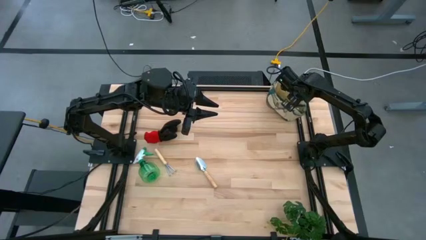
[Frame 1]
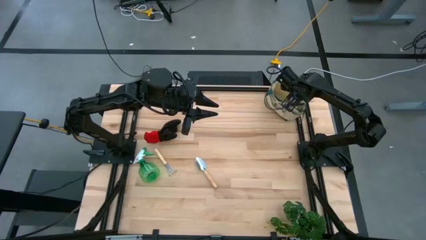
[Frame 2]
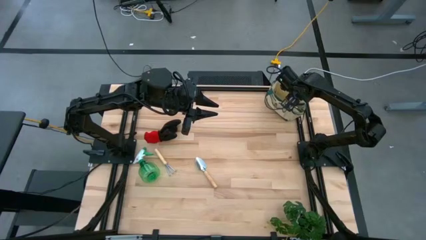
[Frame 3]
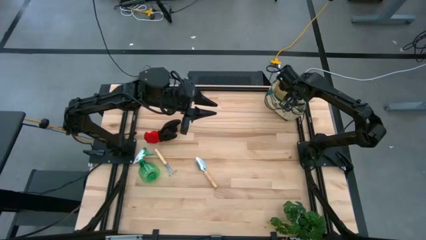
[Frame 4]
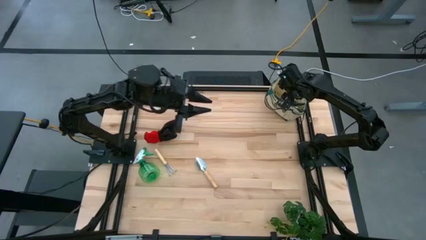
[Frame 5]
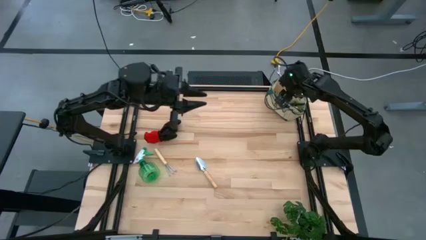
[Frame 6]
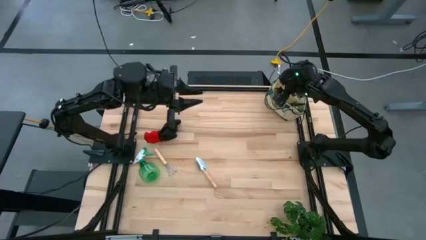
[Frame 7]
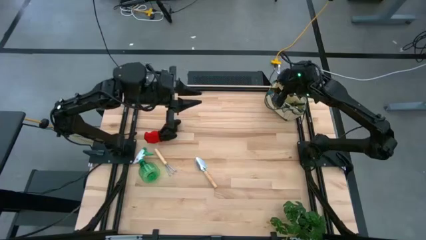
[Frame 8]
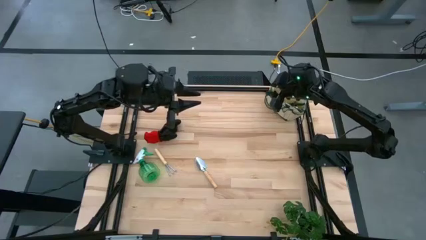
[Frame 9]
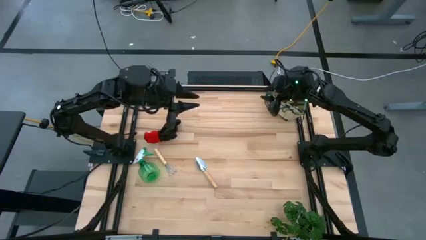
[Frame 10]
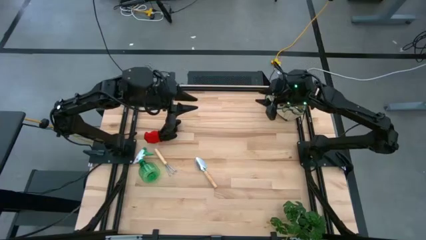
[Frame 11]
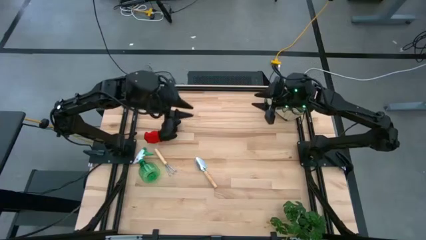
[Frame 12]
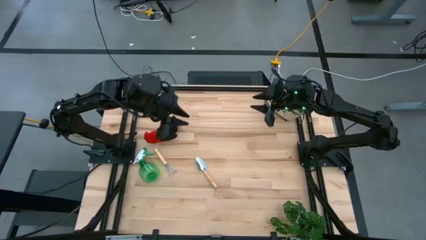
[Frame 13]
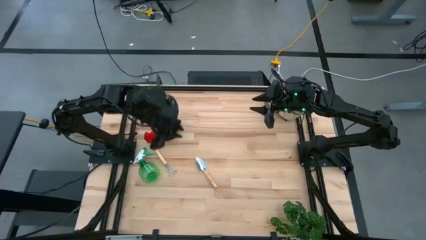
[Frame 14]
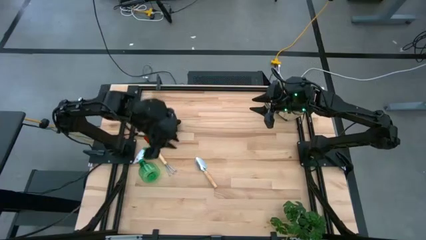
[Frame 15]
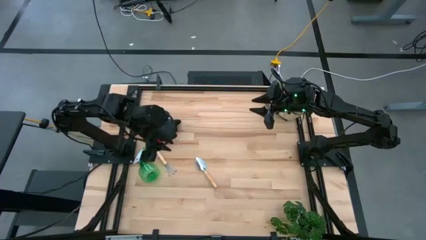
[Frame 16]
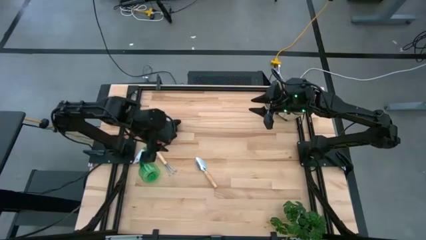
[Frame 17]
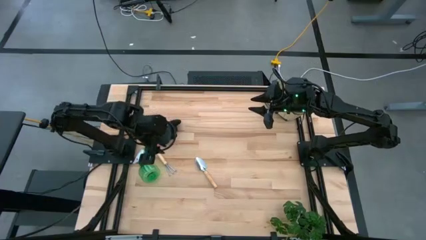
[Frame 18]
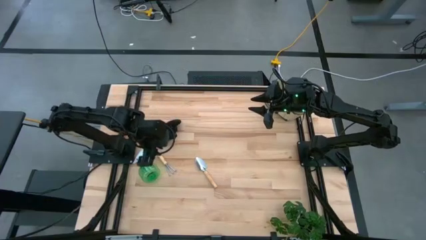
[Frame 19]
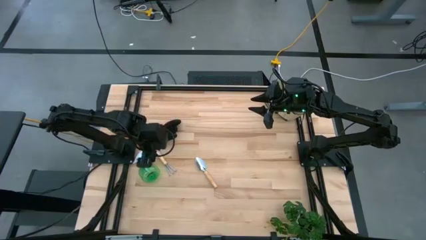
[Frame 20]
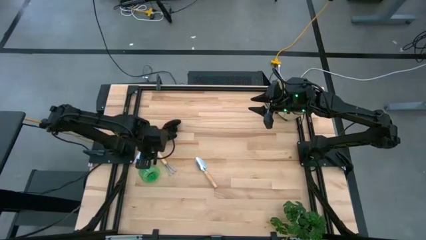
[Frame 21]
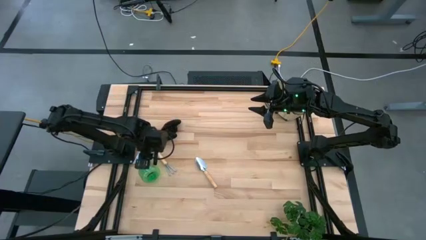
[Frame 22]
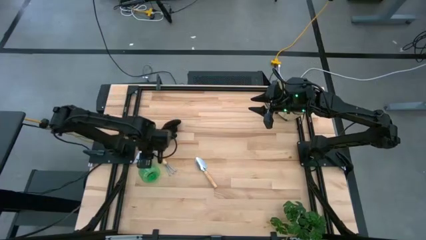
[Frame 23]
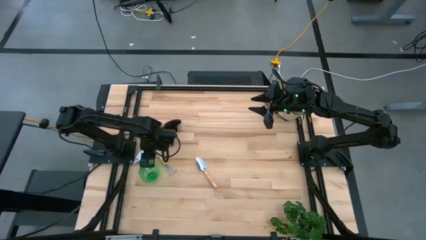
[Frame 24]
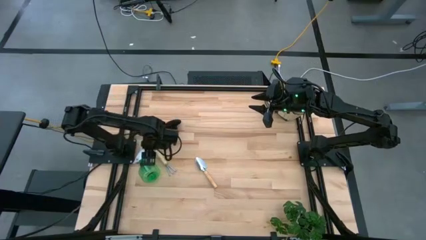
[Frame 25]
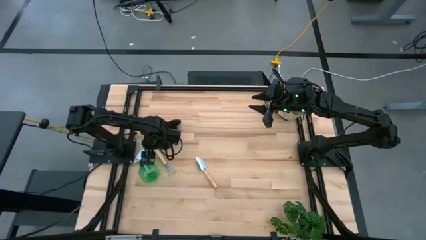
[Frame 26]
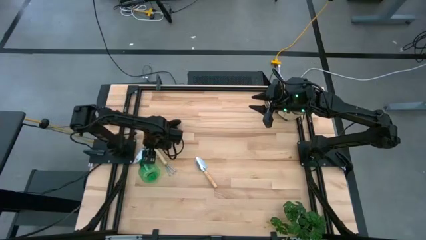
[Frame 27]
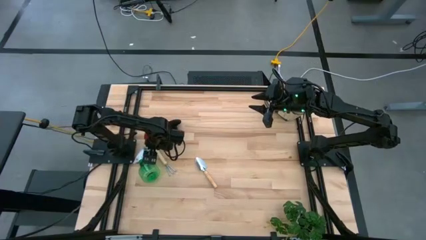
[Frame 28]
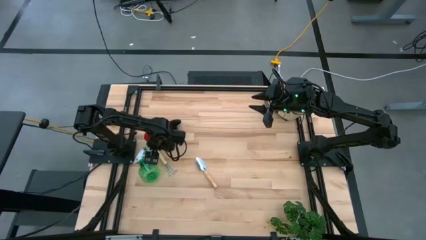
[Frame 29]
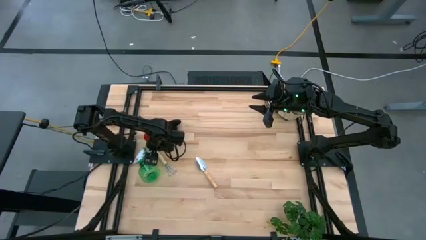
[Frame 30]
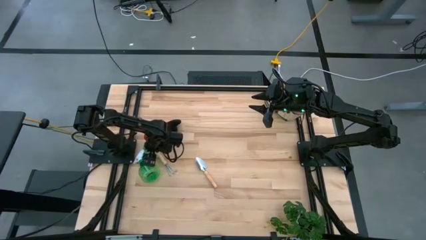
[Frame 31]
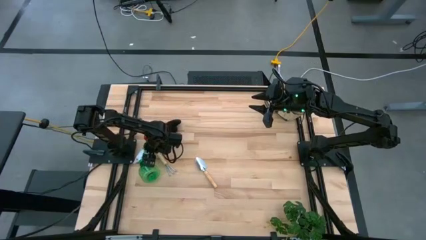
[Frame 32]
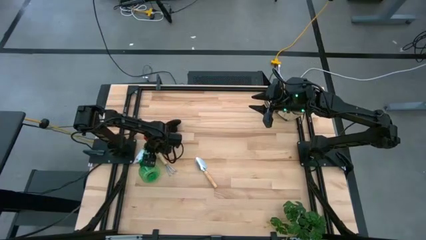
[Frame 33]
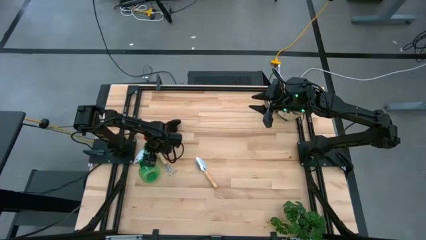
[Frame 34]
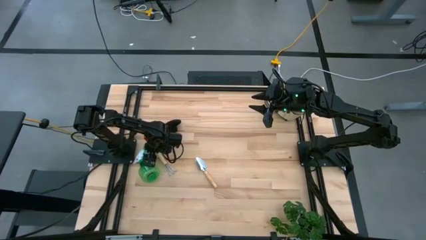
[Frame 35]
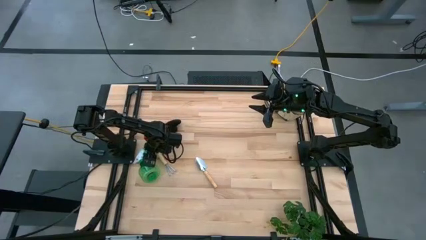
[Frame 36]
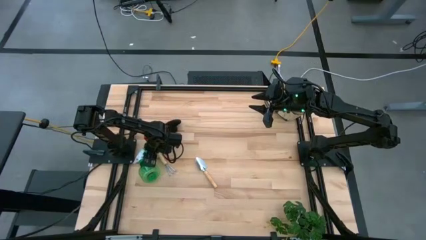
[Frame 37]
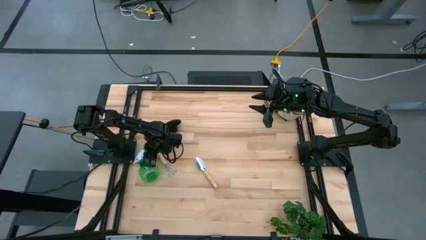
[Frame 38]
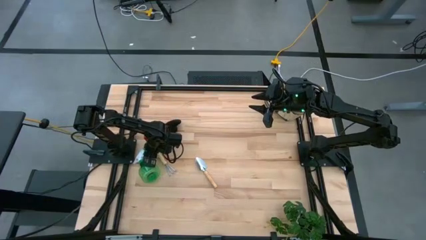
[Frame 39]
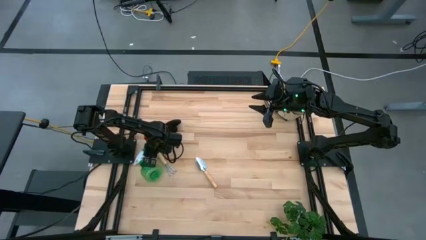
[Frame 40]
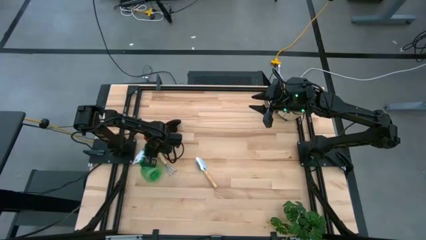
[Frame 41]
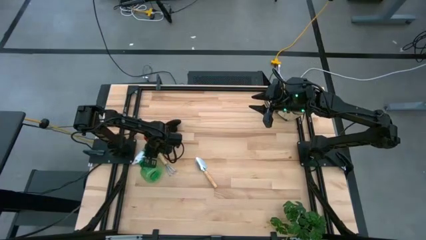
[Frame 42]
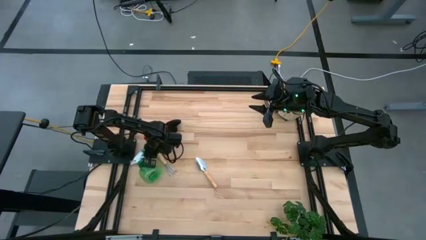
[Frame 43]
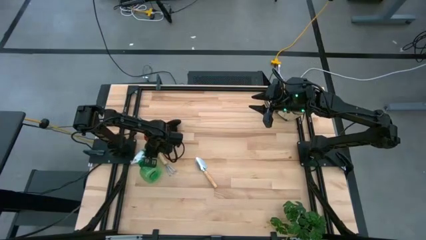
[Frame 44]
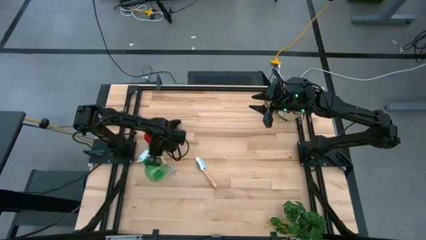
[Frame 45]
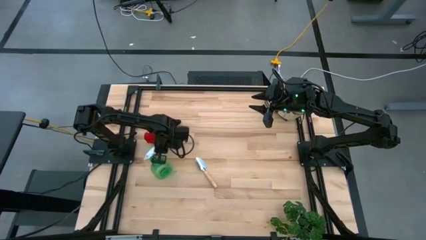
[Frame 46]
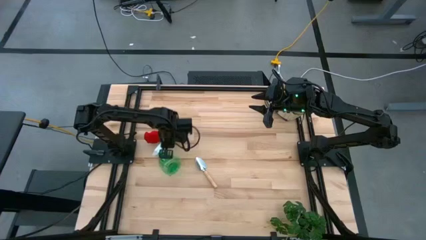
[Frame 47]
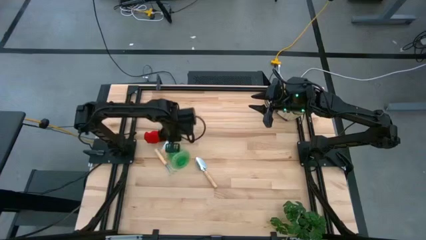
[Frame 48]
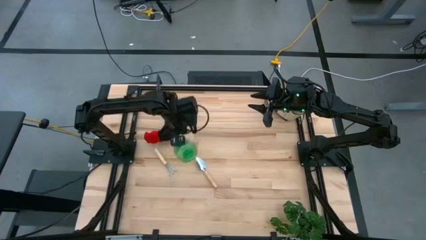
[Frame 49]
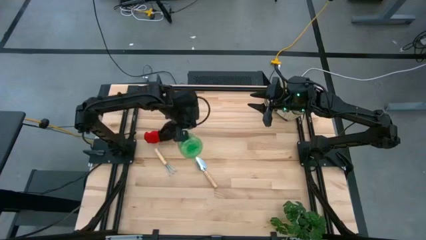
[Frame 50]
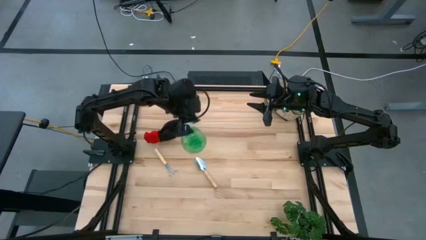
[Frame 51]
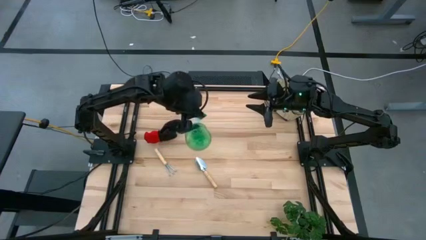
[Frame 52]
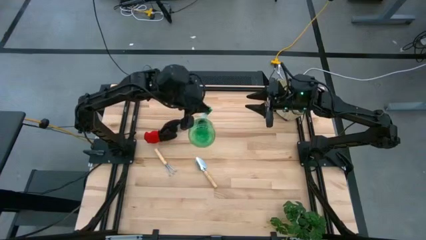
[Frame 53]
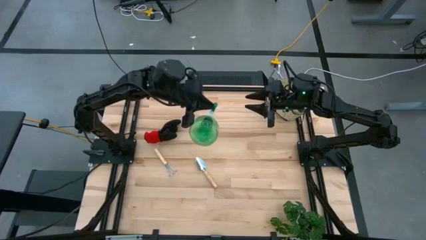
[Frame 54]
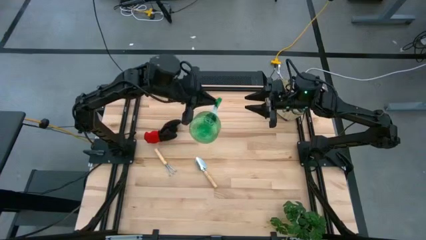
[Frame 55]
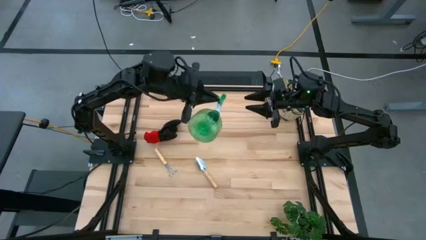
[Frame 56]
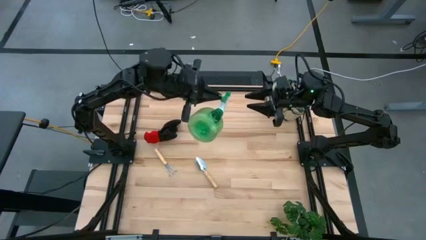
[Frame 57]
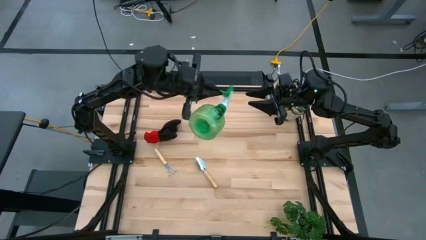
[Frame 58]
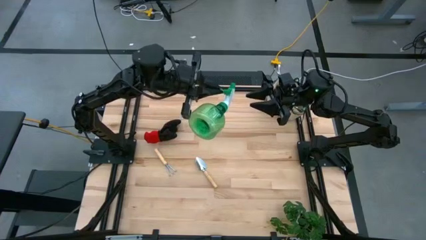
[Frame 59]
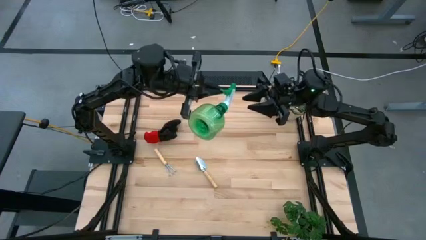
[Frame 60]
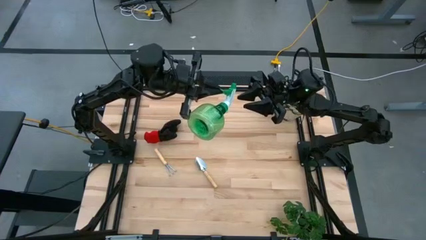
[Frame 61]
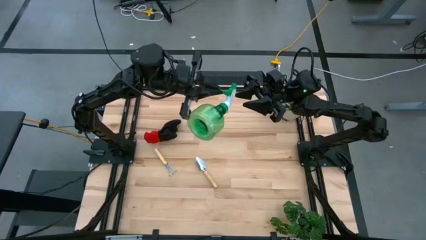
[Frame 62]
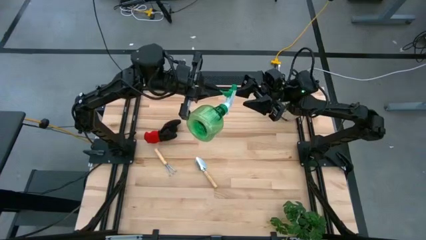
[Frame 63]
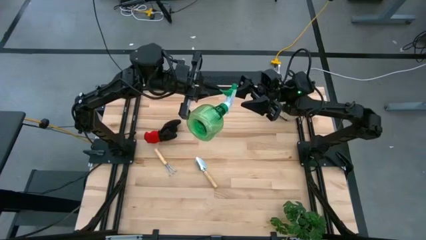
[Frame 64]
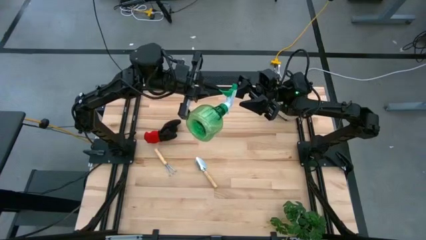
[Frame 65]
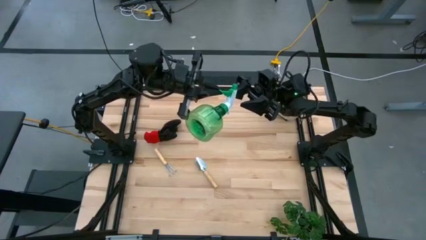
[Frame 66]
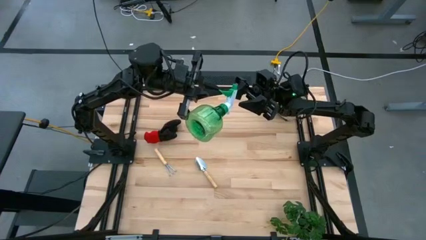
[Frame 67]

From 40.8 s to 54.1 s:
Task: Pick & Place Garden tools in Gardening bag
Put the green spray bottle into the gardening bag

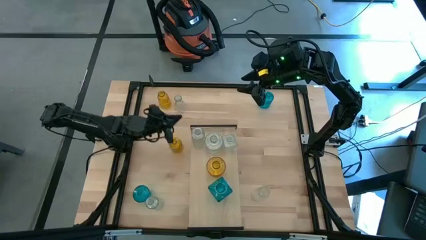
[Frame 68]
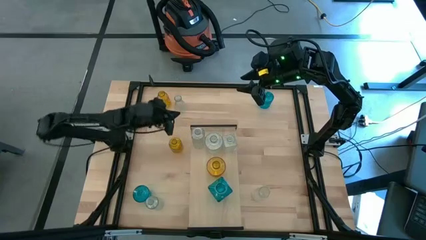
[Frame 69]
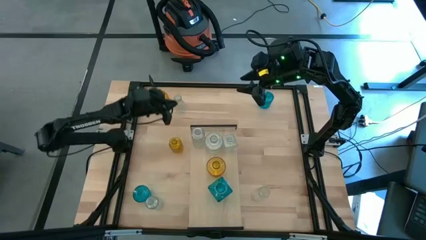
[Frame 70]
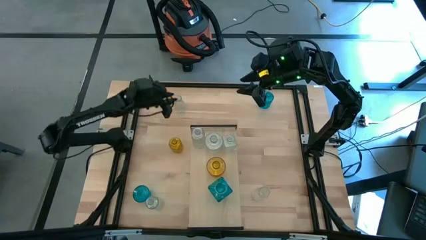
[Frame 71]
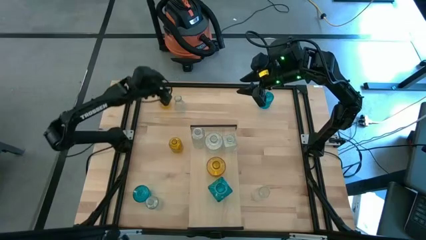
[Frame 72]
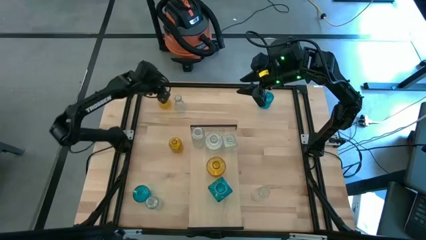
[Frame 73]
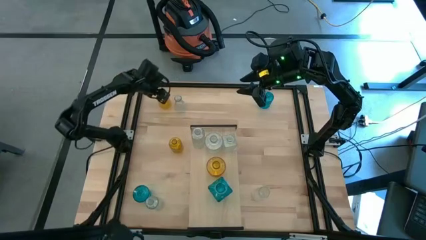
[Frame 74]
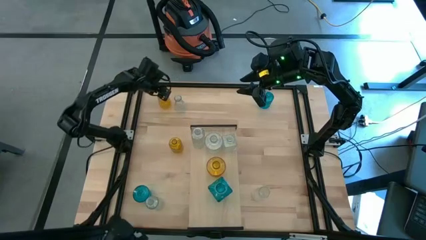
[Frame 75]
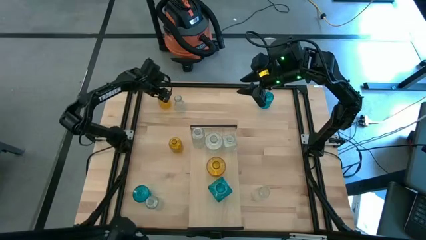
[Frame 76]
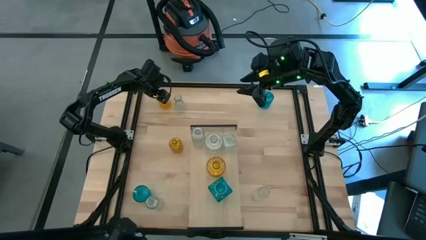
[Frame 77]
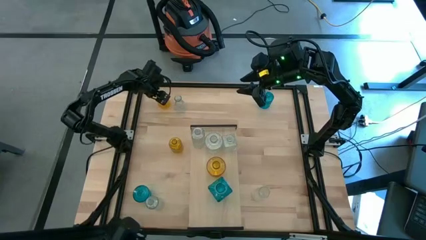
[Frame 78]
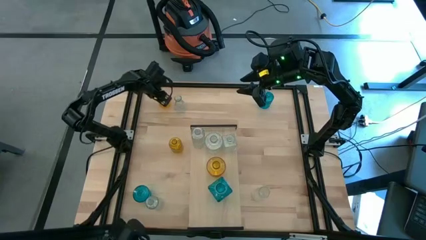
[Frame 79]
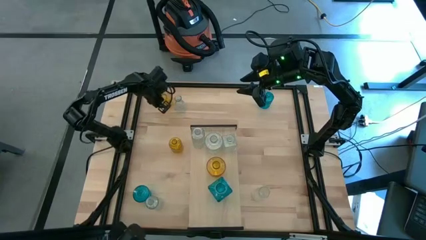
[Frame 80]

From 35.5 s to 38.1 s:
Task: sort vases onto shelf
Put the yellow vase on the shelf aligned with the other yellow vase
